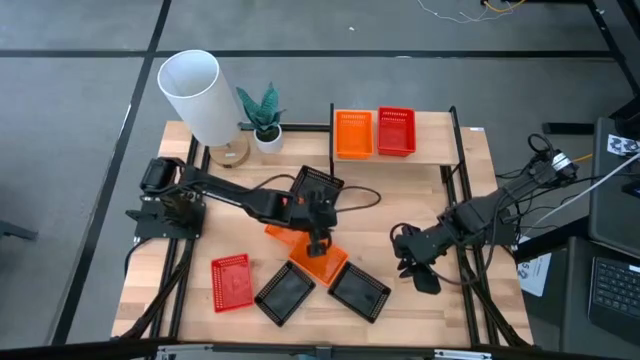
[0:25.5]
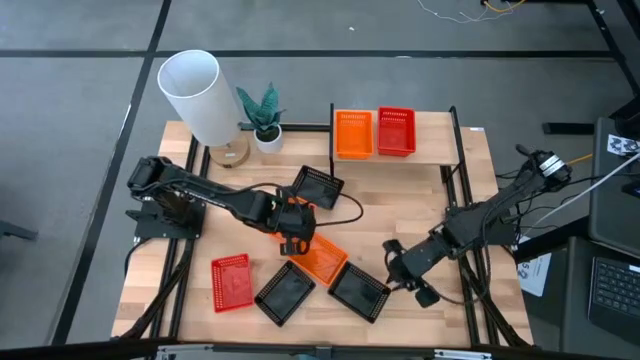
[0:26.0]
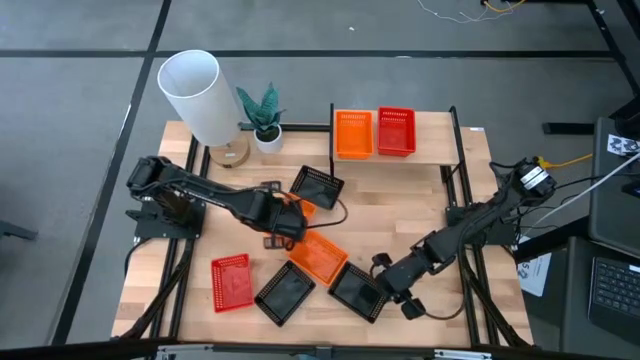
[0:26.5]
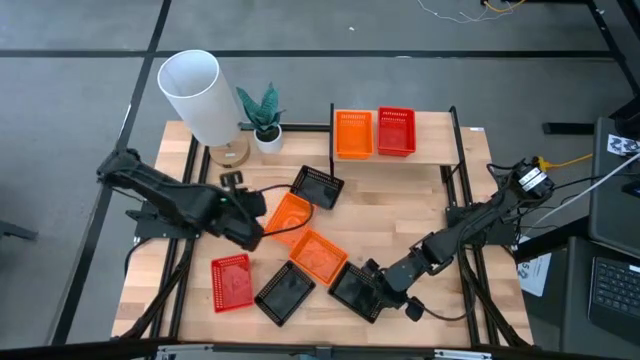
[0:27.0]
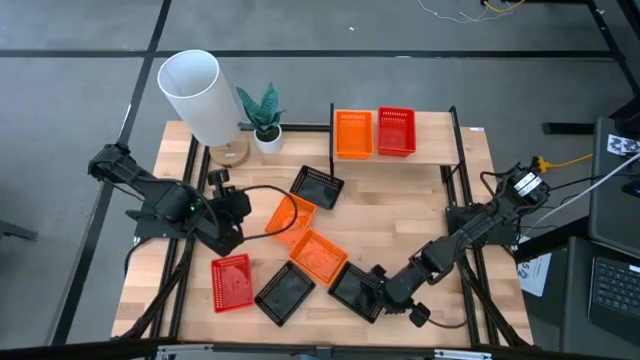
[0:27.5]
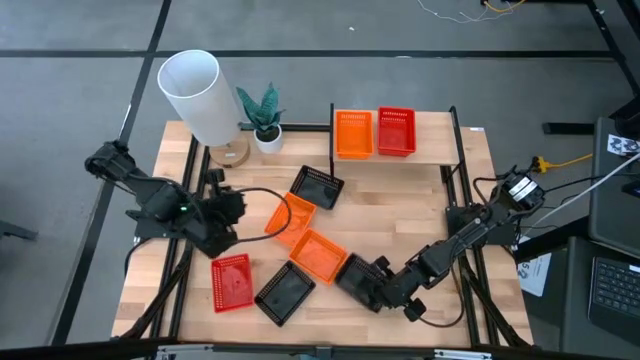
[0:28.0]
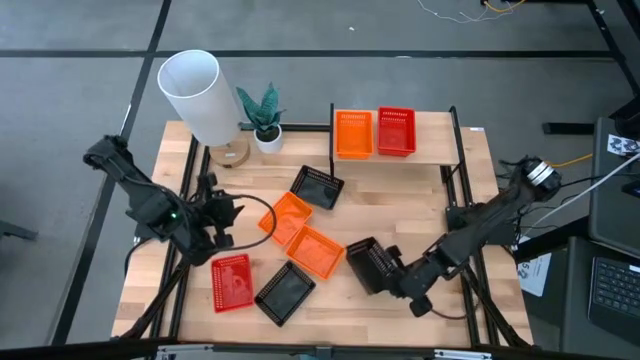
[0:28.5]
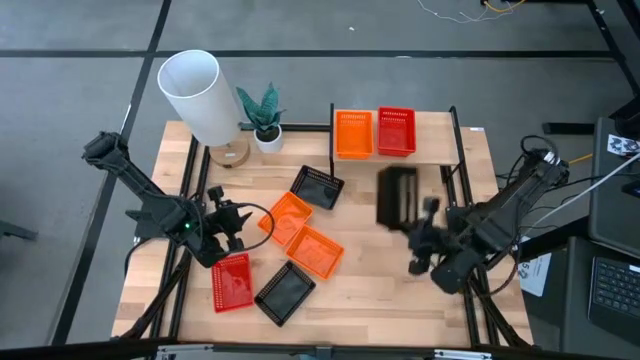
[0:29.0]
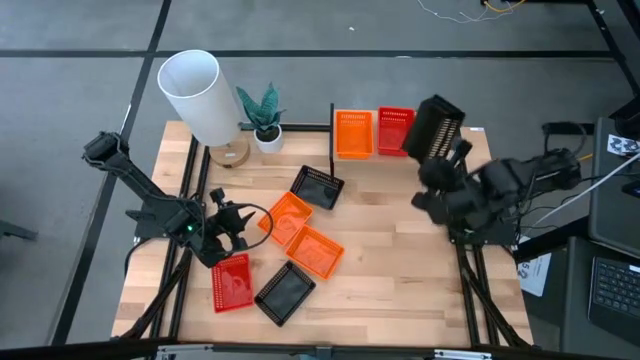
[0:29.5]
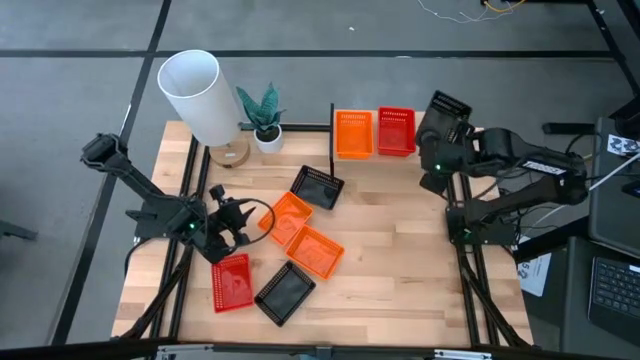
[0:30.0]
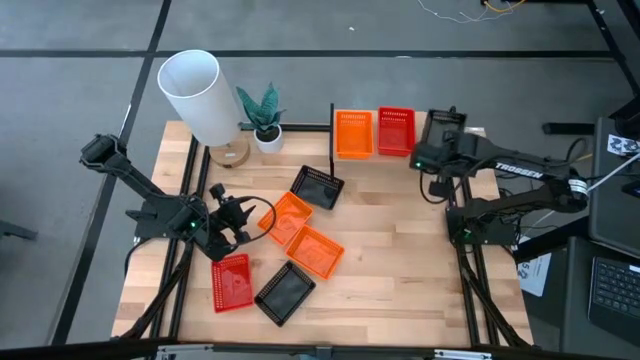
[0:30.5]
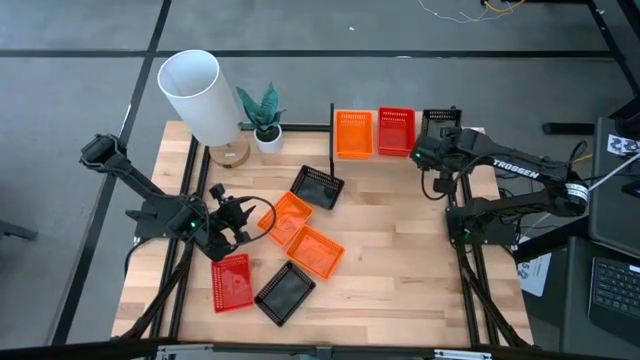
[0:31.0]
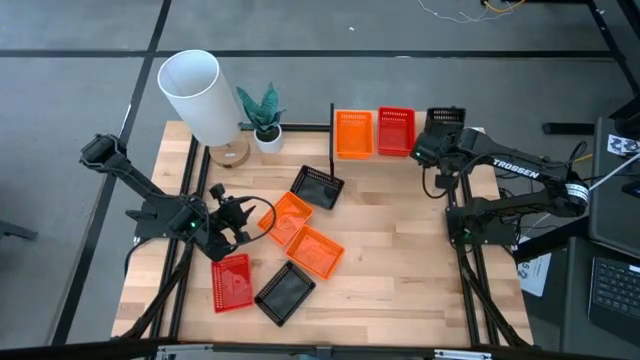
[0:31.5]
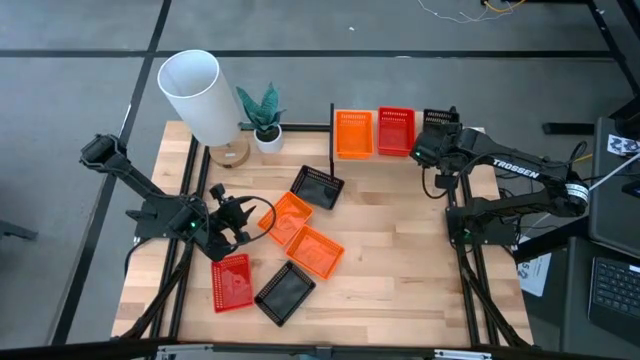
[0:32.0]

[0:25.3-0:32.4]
Task: Stack baskets on shelf by color
Put the right black basket on the shelf

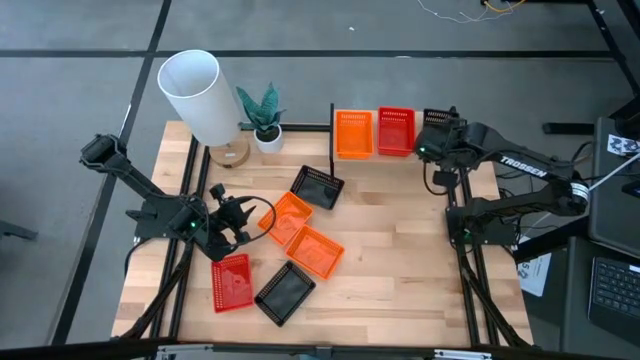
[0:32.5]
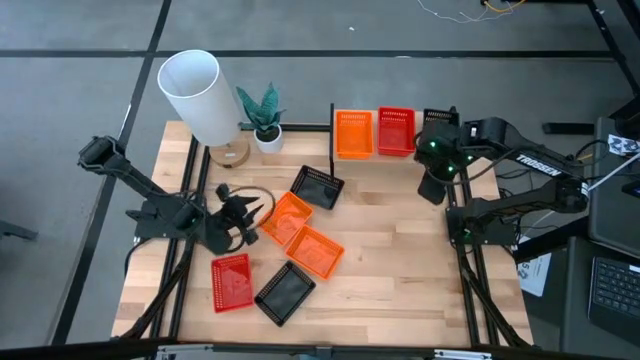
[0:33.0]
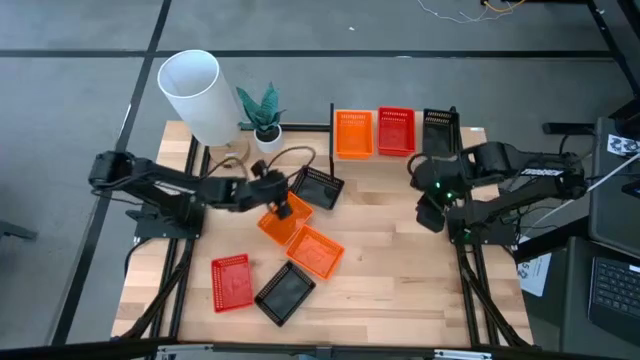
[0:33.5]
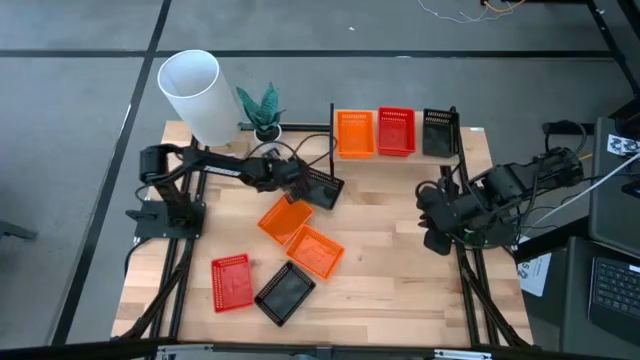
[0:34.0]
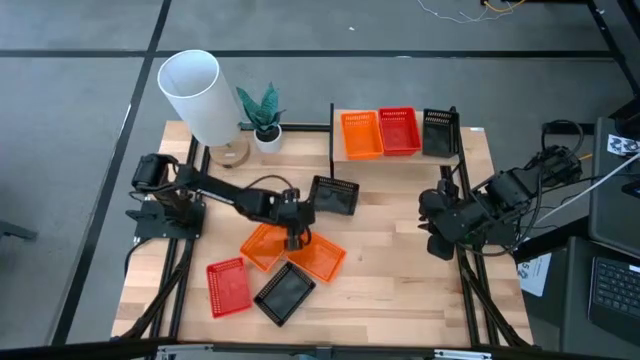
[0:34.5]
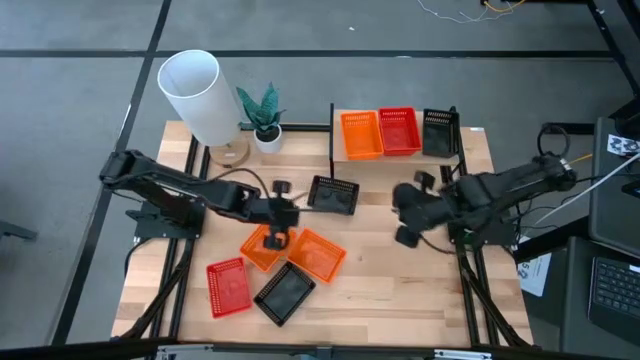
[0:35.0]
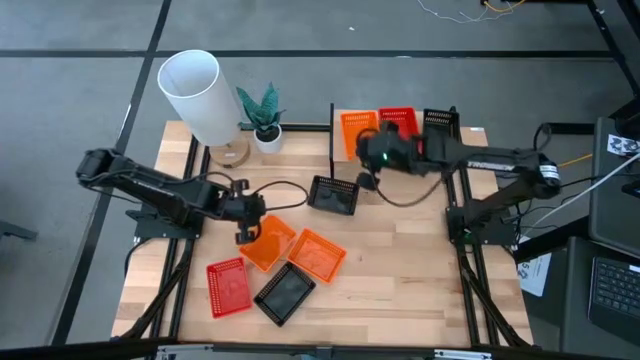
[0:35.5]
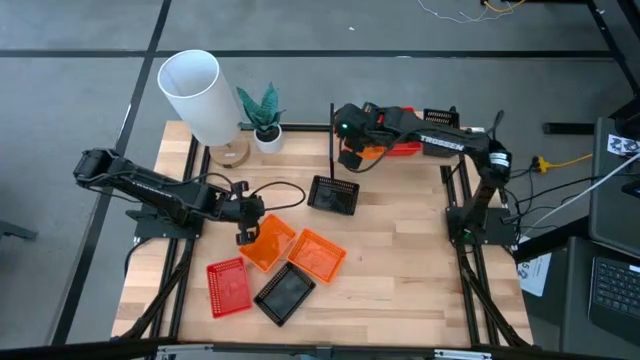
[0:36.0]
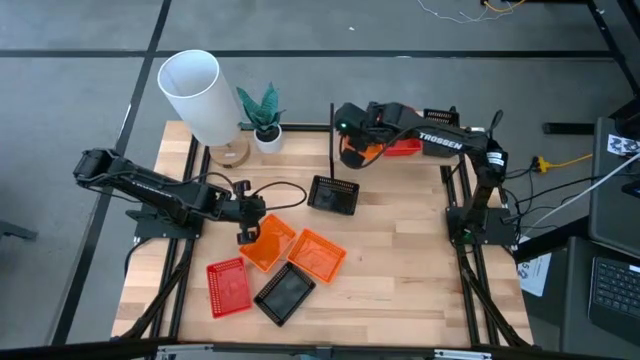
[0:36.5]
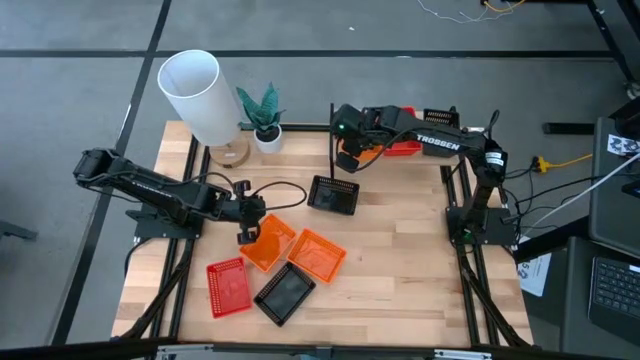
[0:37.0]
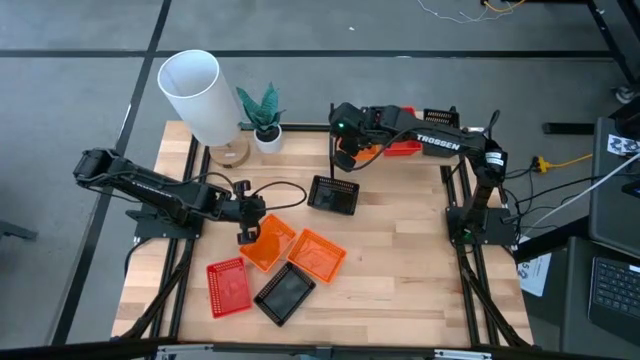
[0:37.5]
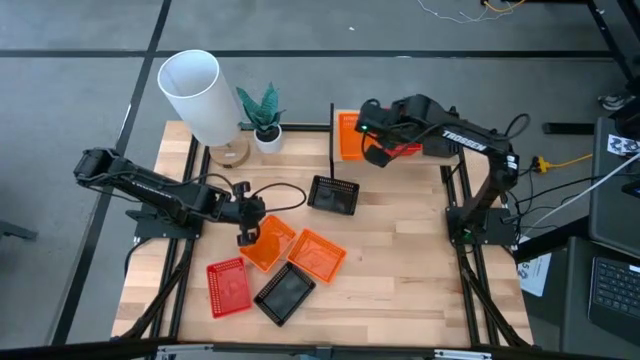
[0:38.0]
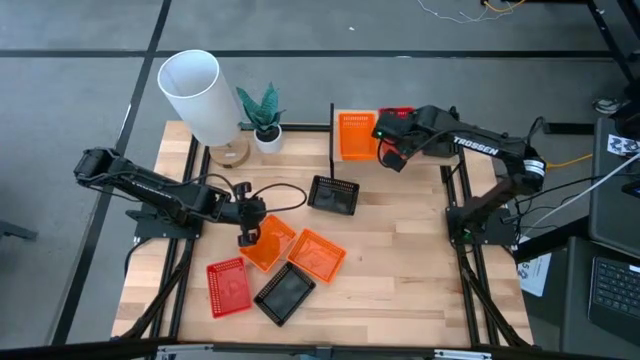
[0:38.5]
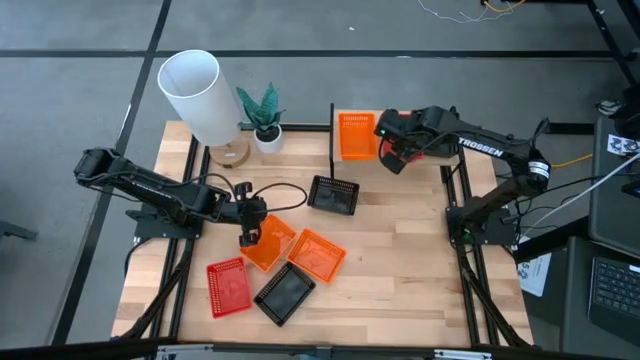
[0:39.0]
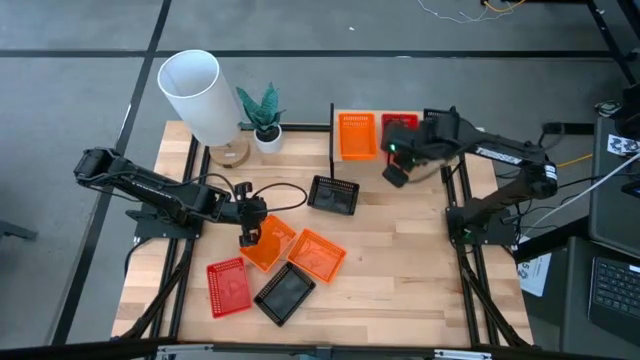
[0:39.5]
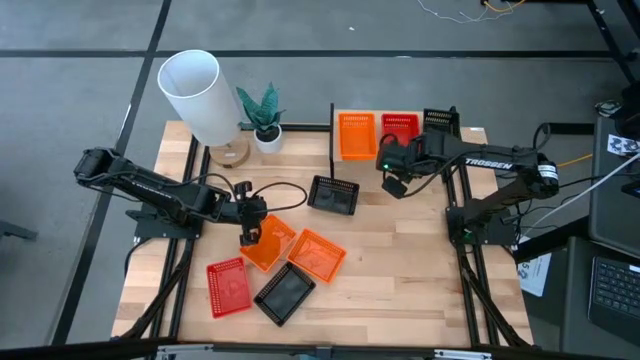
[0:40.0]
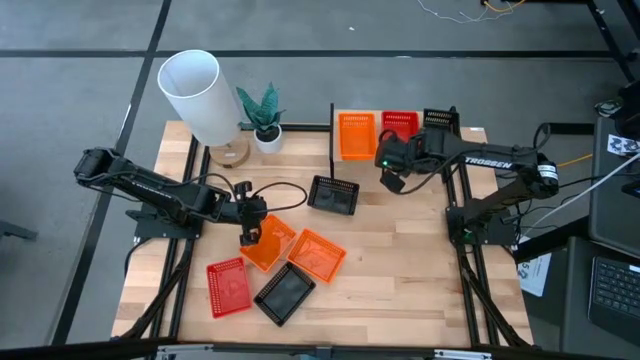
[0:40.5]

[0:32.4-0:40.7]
Adjust the baskets on the shelf

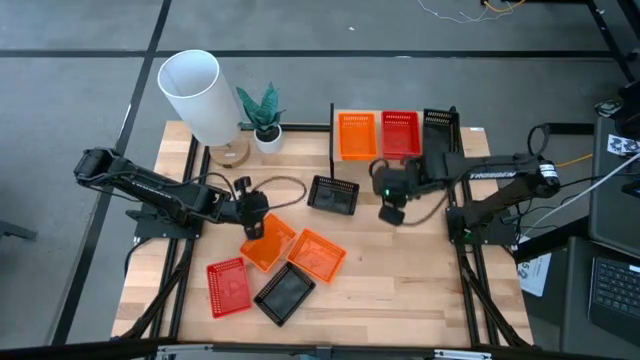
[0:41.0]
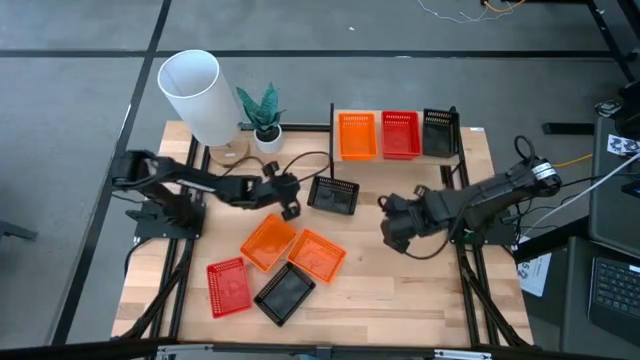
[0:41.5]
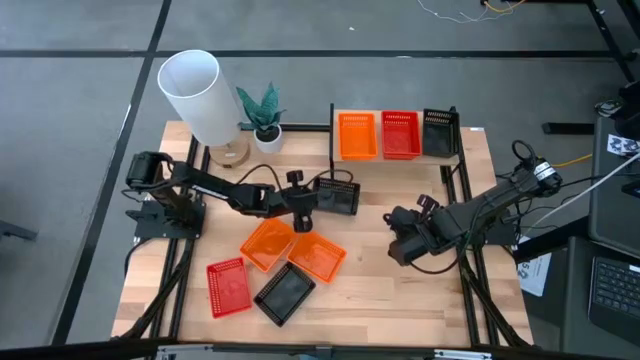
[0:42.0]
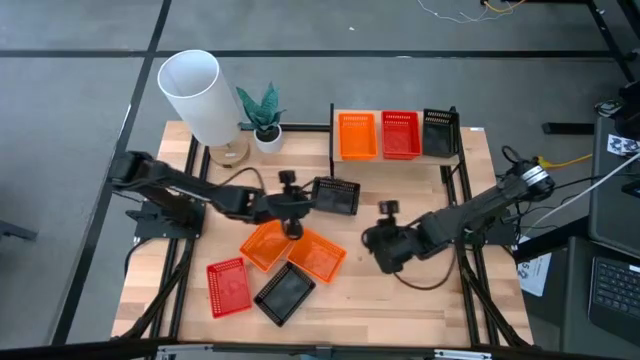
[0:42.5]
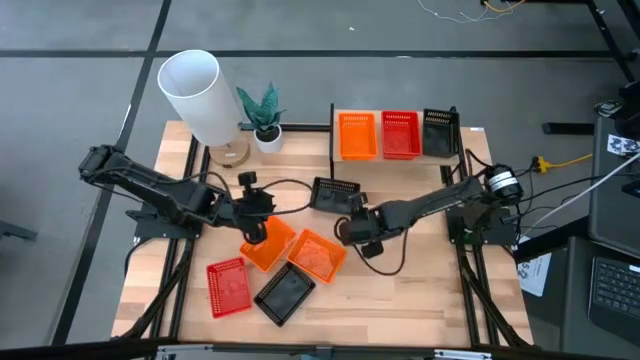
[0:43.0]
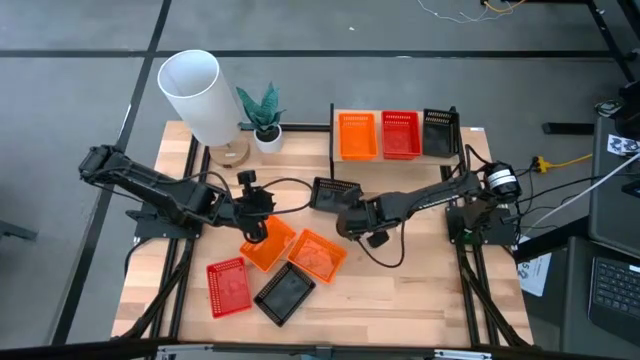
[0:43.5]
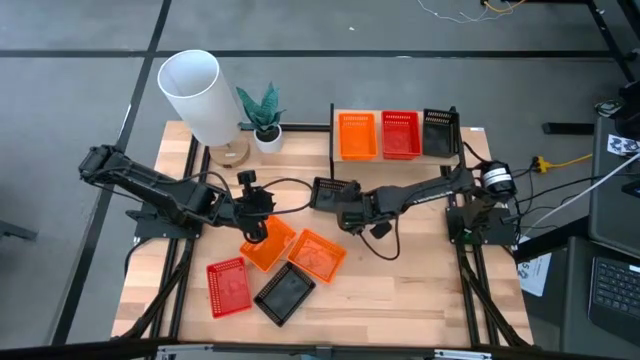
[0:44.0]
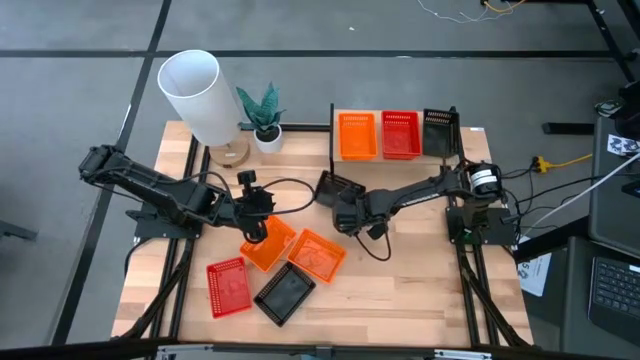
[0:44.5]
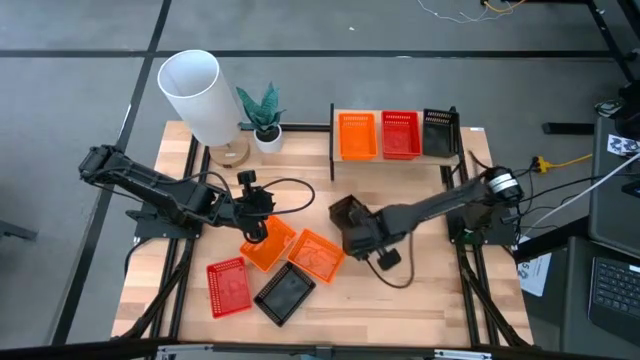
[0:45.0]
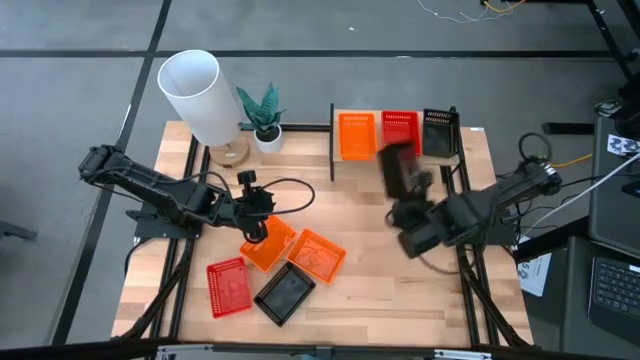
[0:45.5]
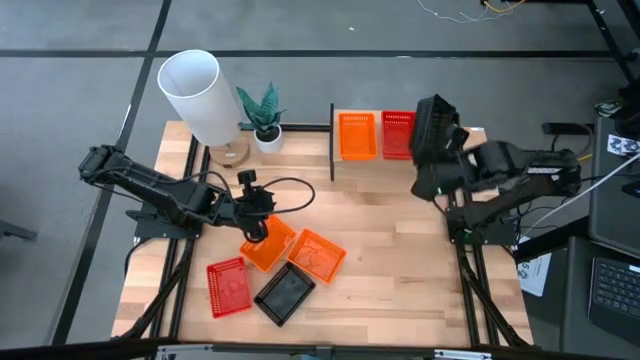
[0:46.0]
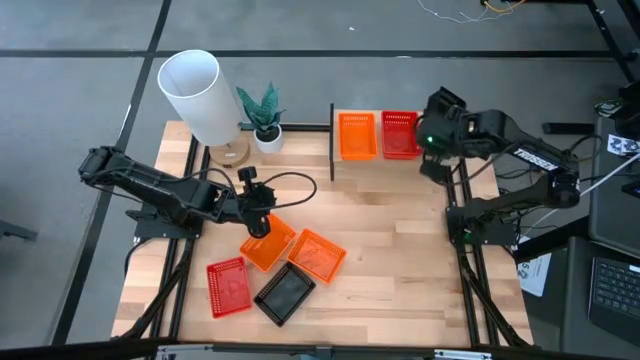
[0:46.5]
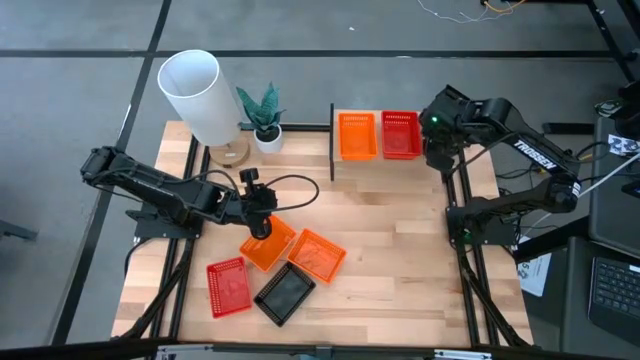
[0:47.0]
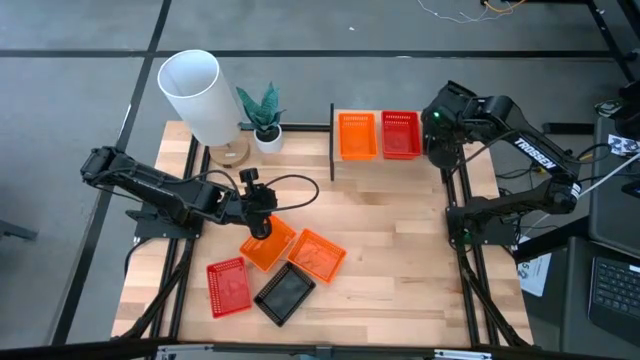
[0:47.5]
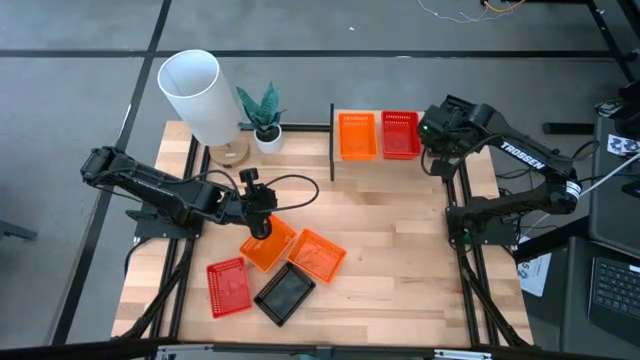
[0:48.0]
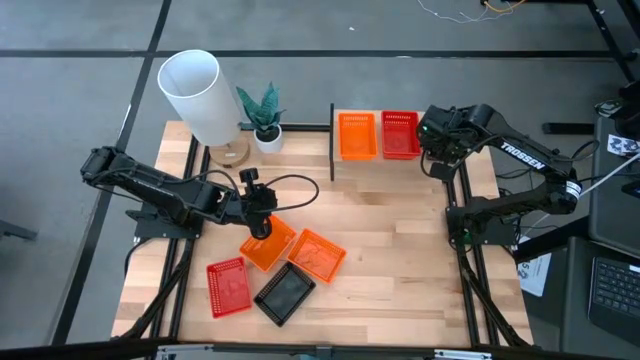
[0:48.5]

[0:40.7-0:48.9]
Stack the top black basket on top of the black basket on the shelf
